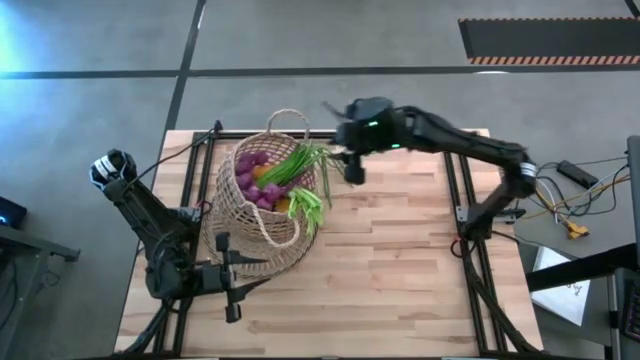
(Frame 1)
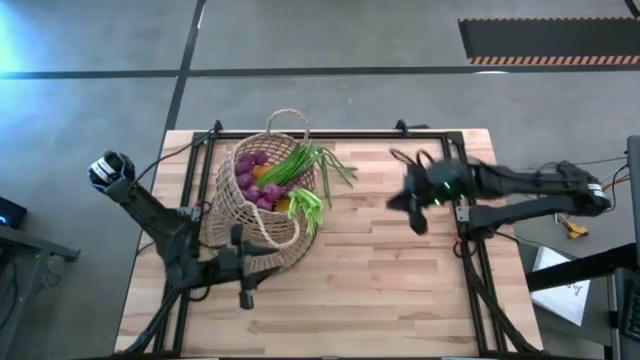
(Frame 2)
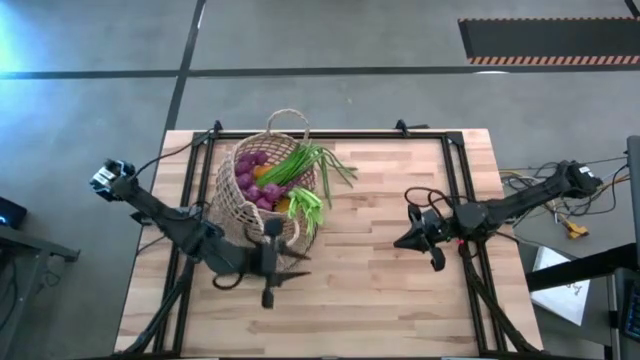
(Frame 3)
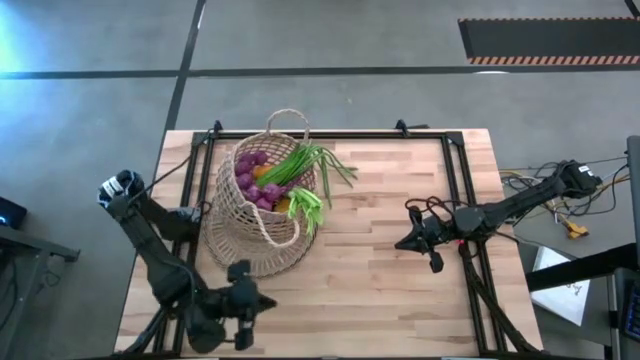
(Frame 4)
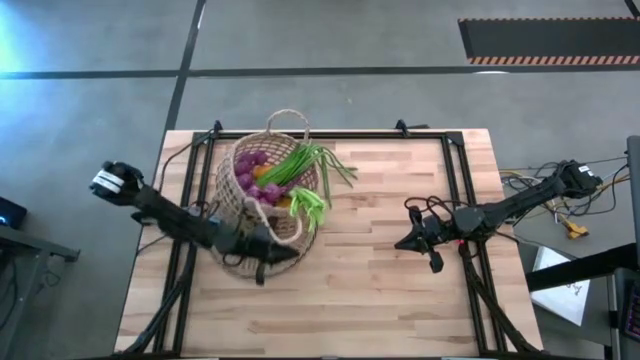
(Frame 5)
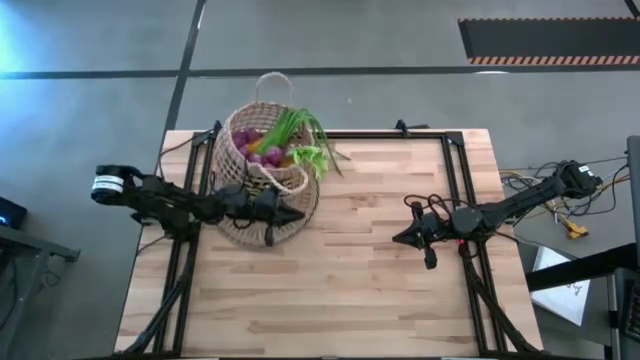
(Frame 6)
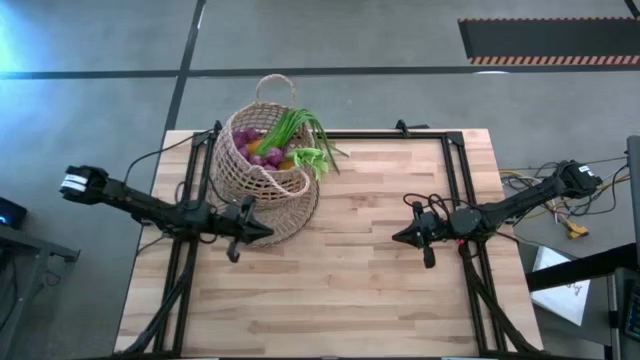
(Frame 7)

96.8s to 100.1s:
Task: Build produce basket
Move the basket to the top left

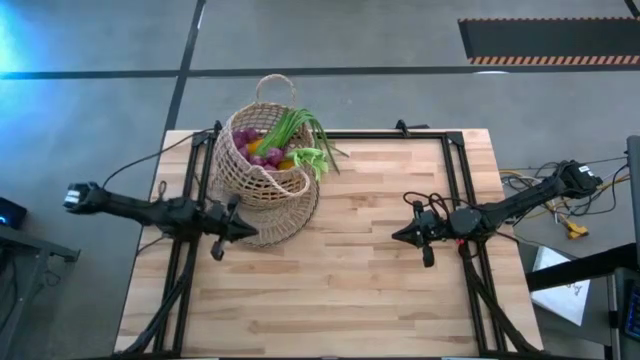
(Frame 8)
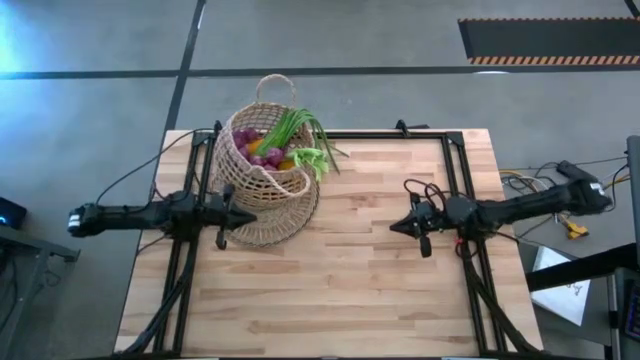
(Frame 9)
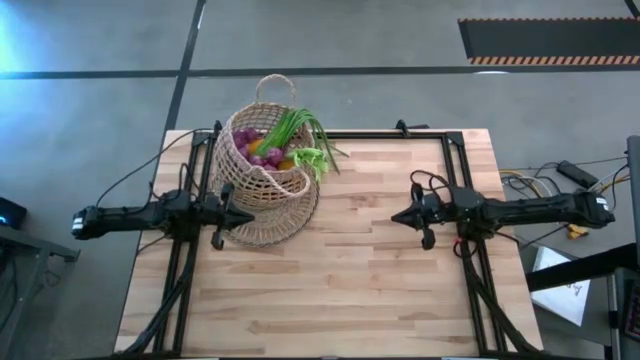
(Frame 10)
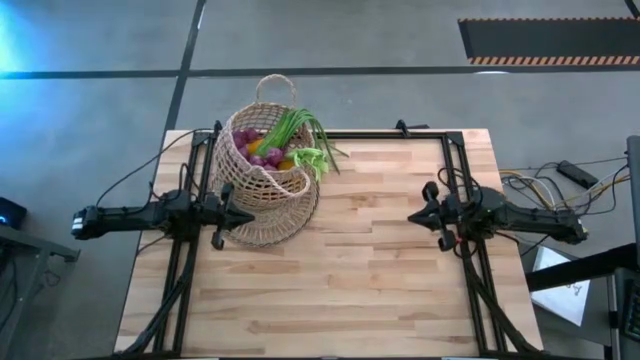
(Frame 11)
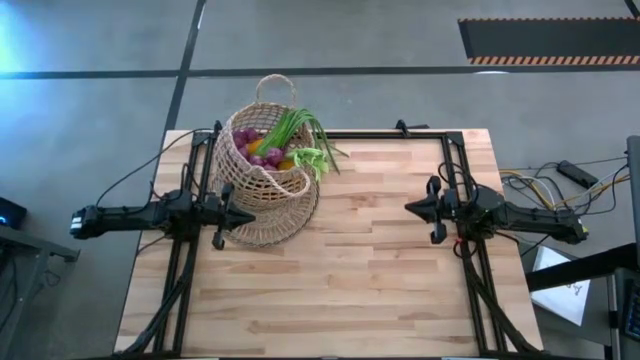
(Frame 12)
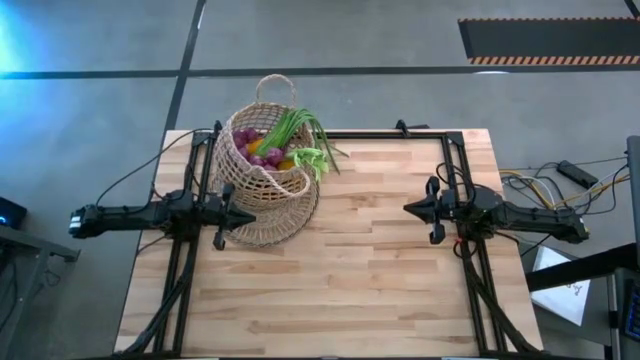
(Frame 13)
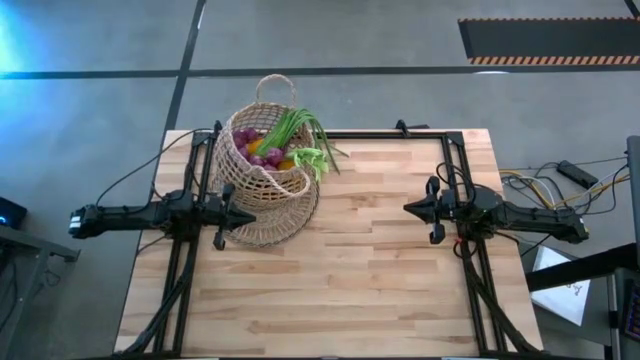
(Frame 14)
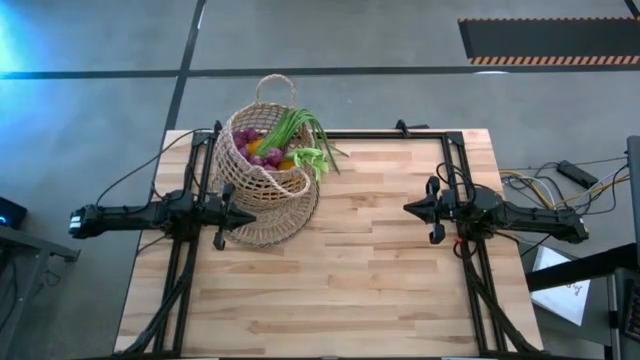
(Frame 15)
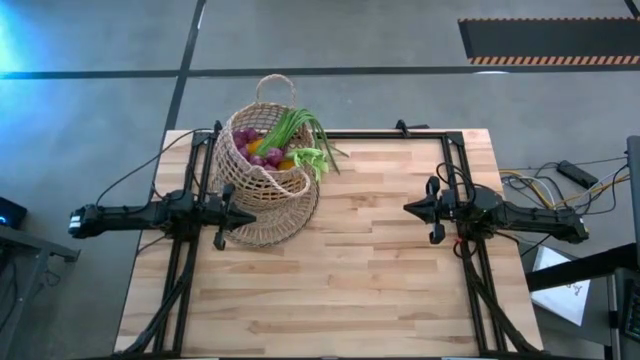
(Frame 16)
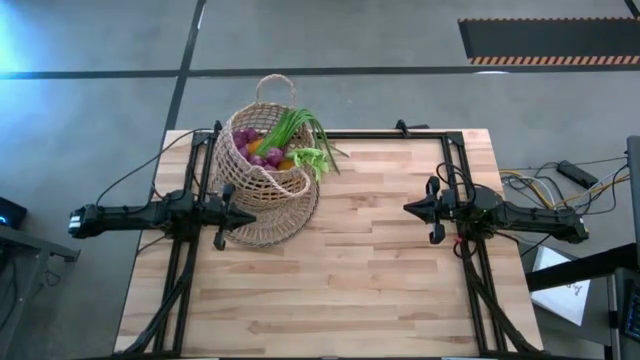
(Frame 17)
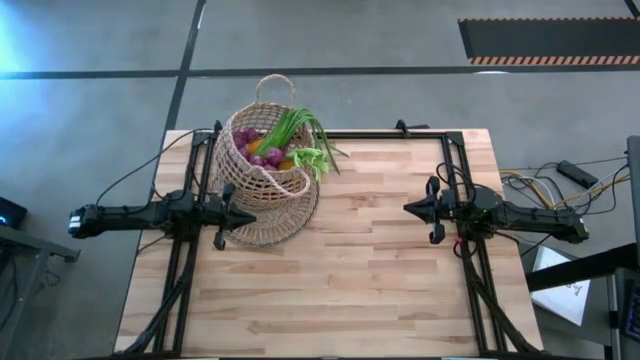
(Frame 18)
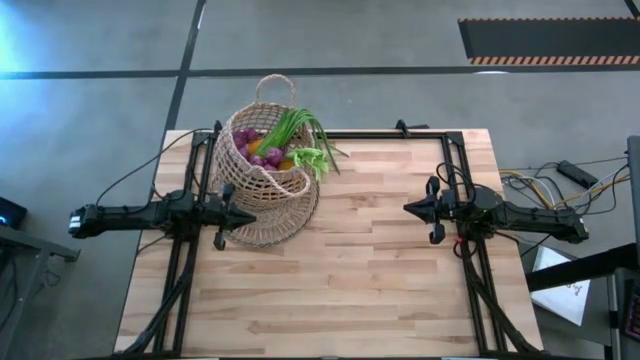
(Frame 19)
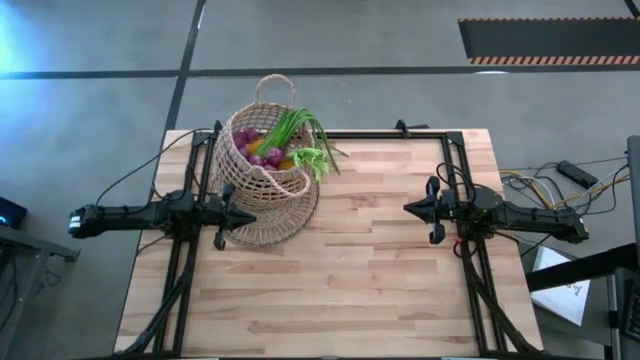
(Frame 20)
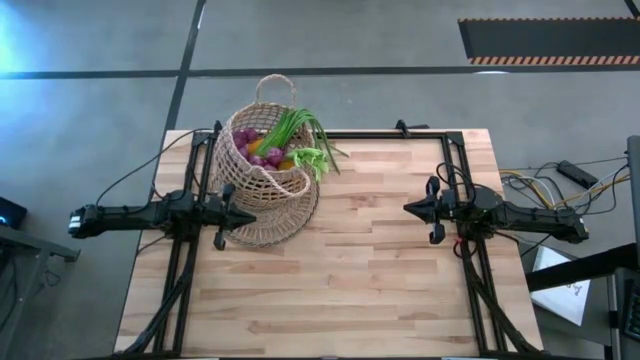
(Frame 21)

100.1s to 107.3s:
Return to Home Position

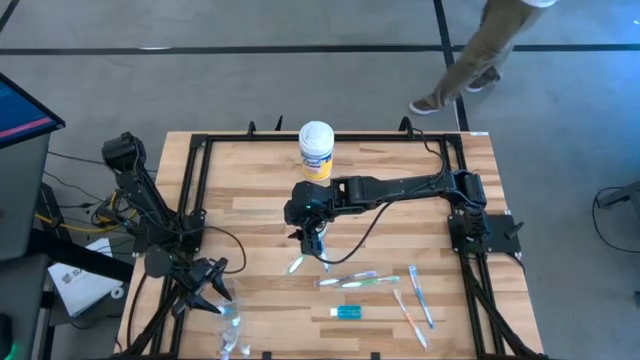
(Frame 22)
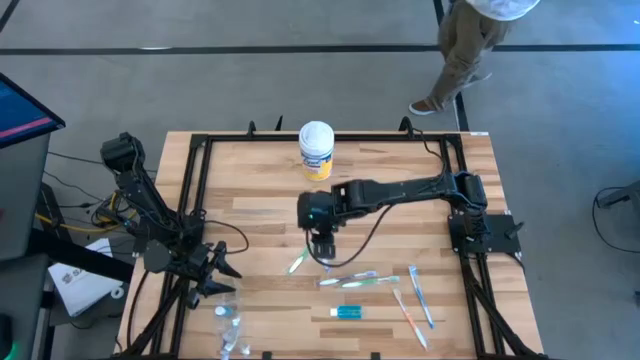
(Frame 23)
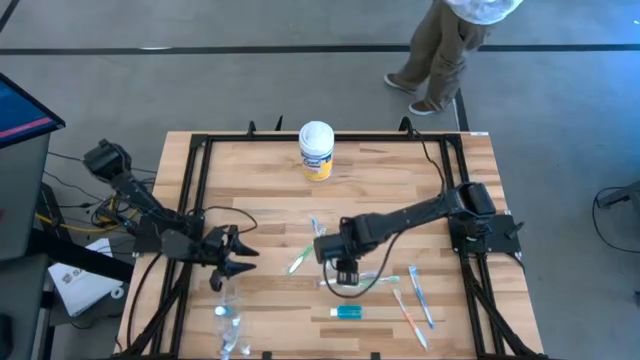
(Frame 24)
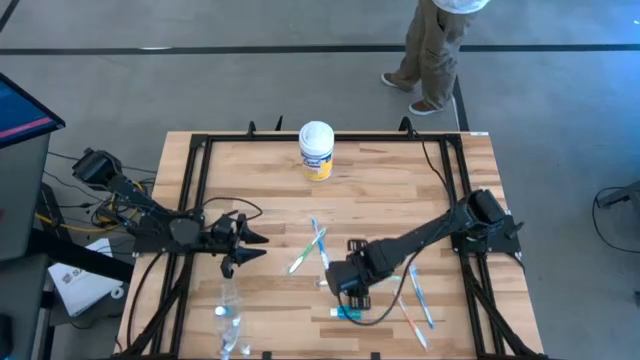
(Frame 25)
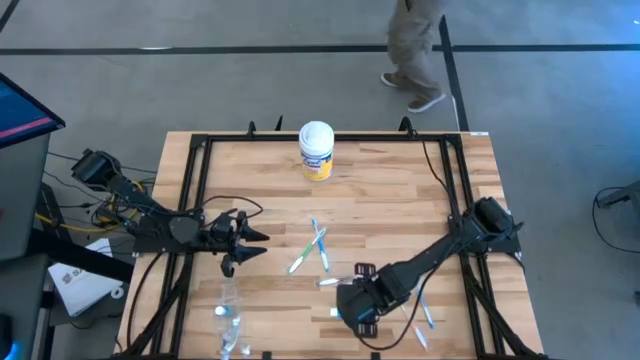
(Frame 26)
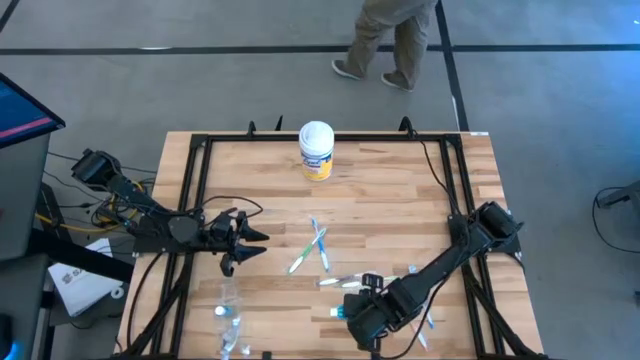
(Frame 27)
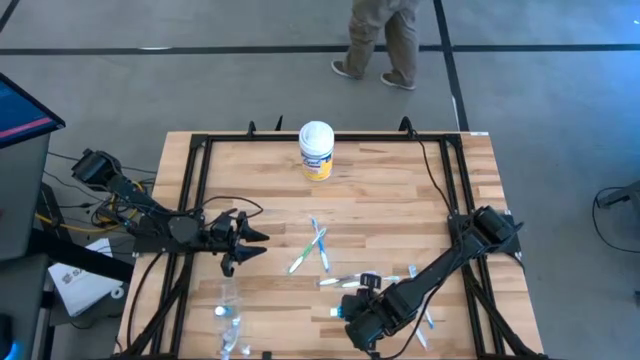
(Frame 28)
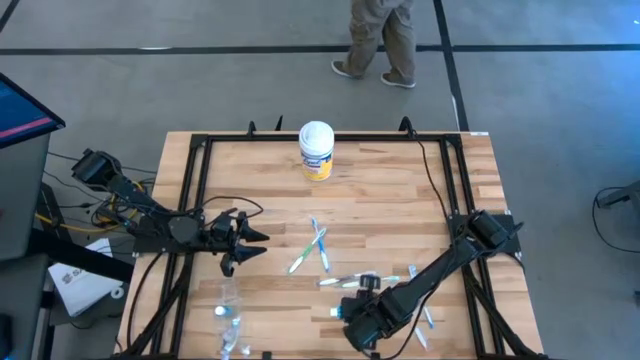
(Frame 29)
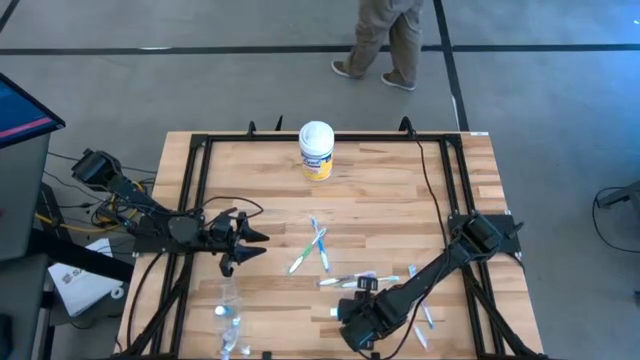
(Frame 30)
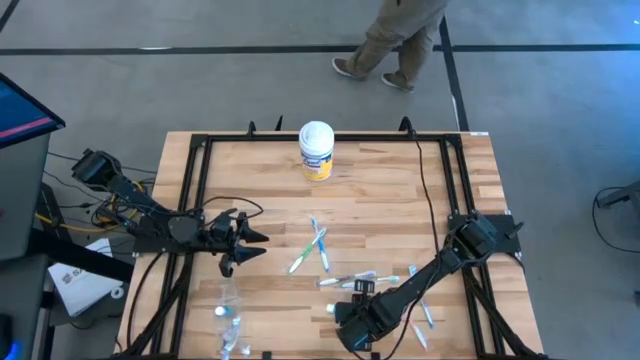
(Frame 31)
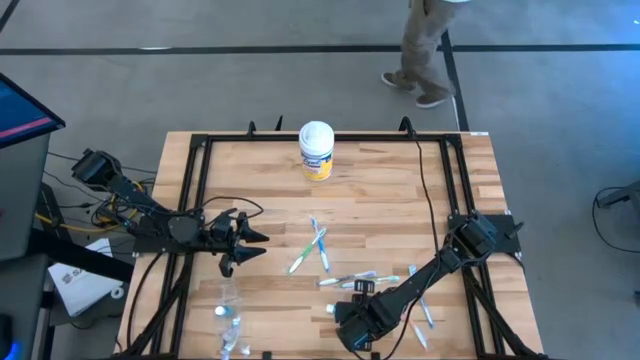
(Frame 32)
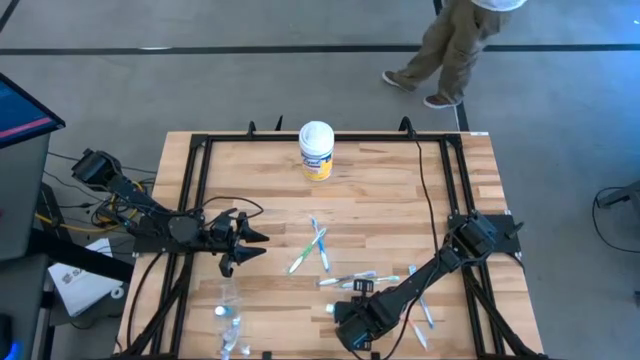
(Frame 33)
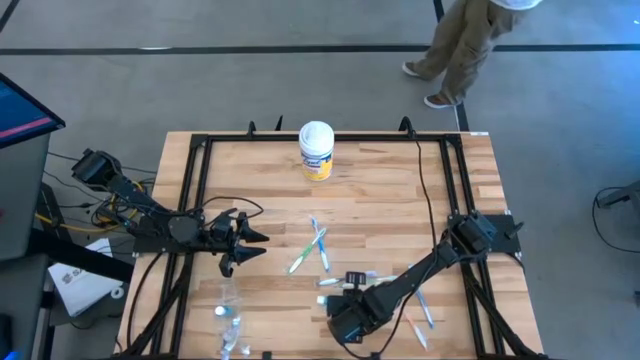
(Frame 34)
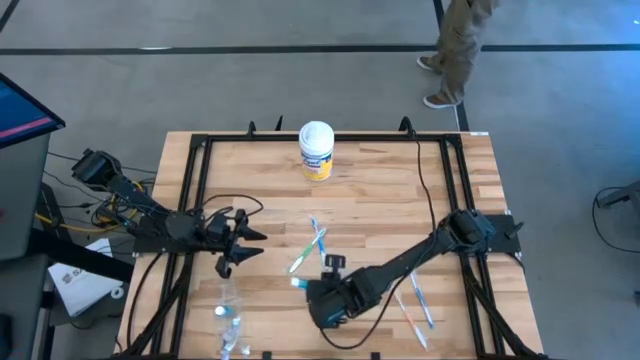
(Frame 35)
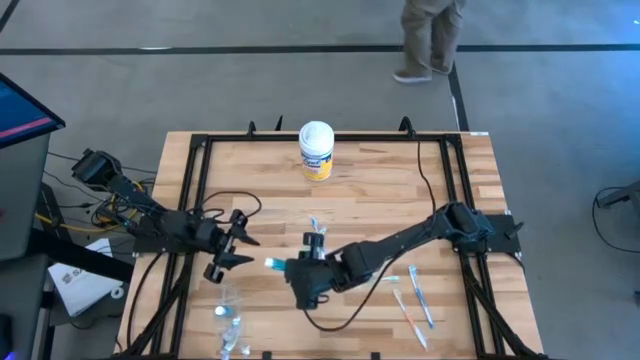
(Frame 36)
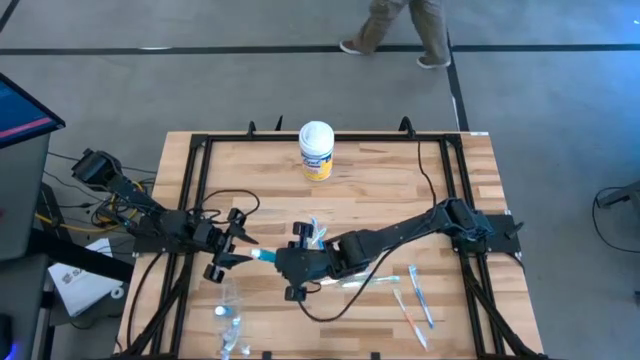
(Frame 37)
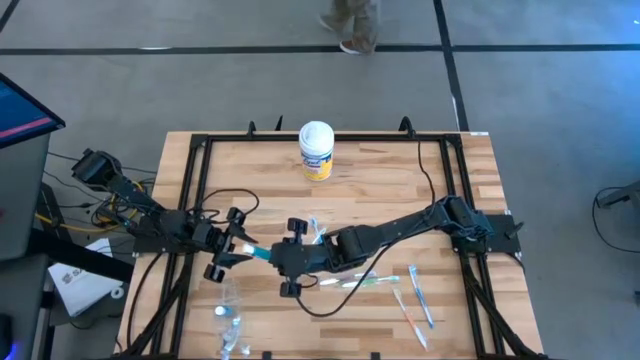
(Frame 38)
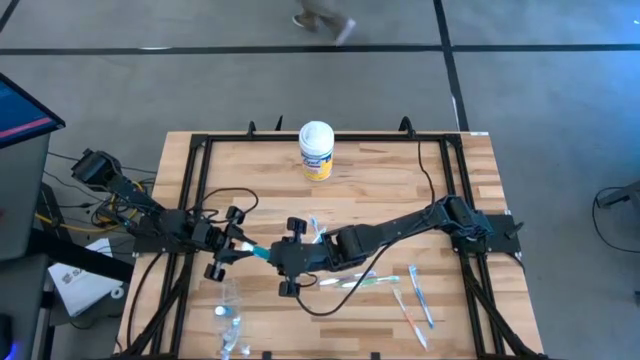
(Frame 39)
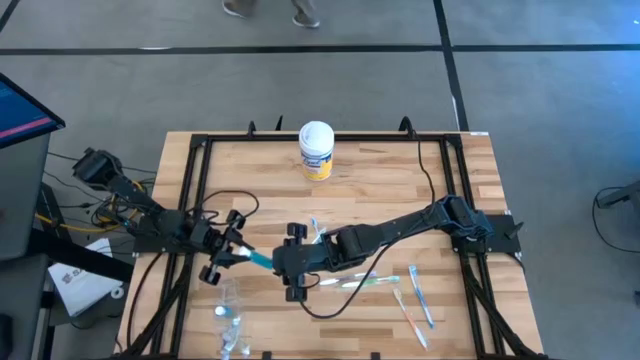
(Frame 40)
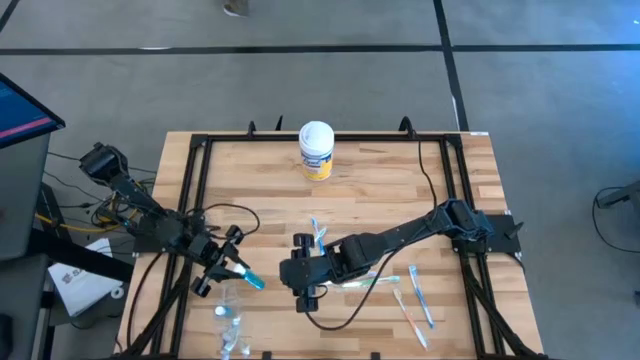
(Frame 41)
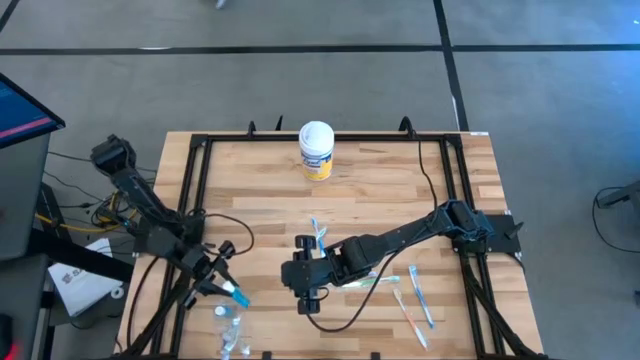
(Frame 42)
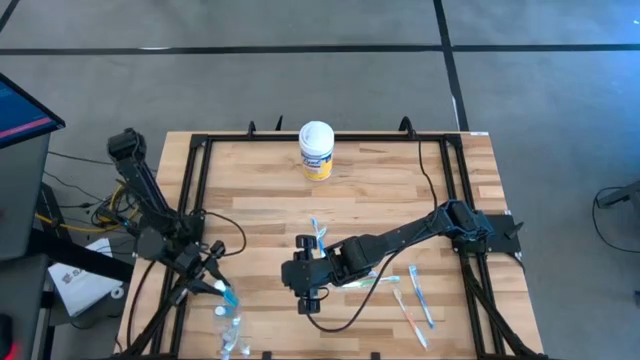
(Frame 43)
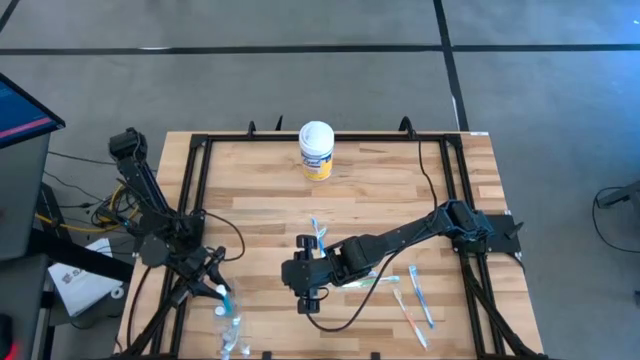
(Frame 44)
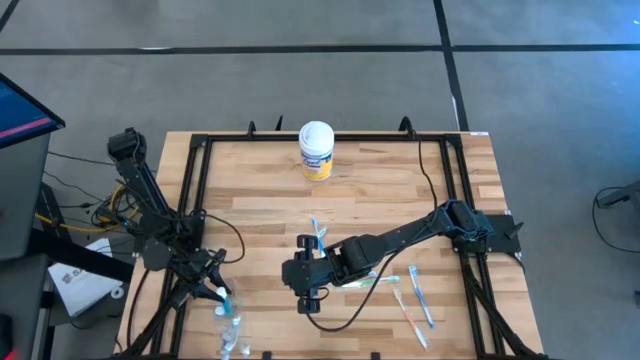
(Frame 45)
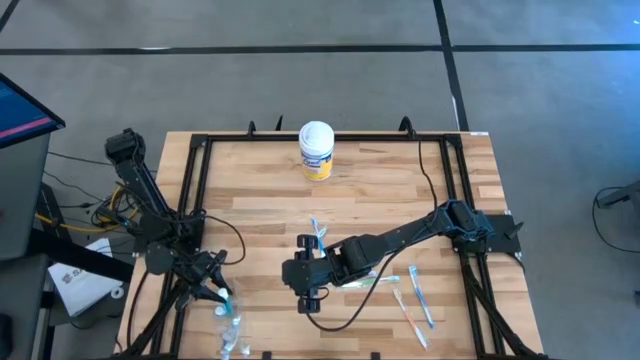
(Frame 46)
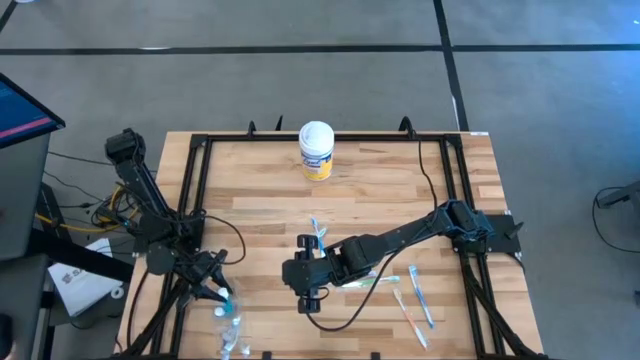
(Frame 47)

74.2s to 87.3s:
Task: Pick & Place toothbrushing station
Put the blue mouthwash into the transparent organizer
